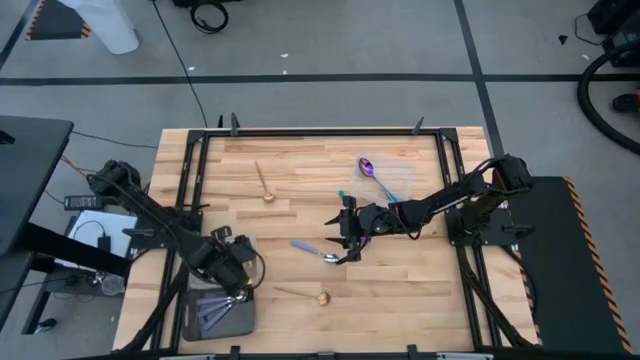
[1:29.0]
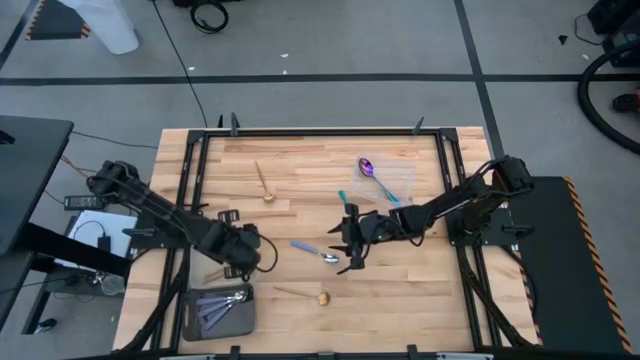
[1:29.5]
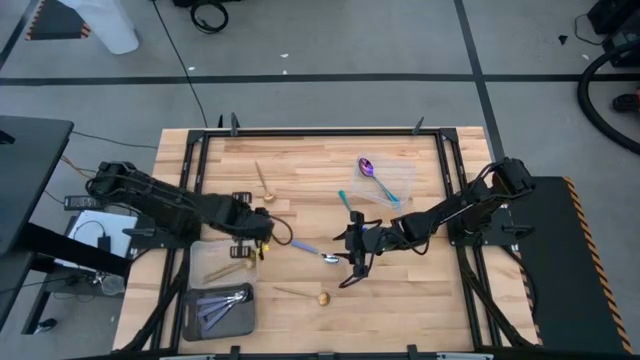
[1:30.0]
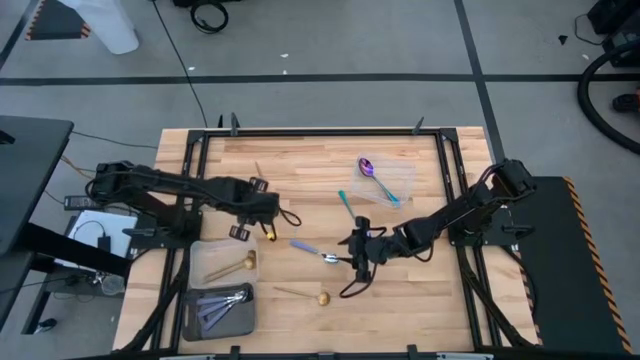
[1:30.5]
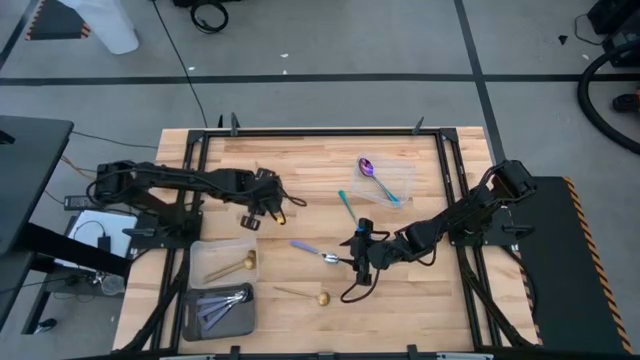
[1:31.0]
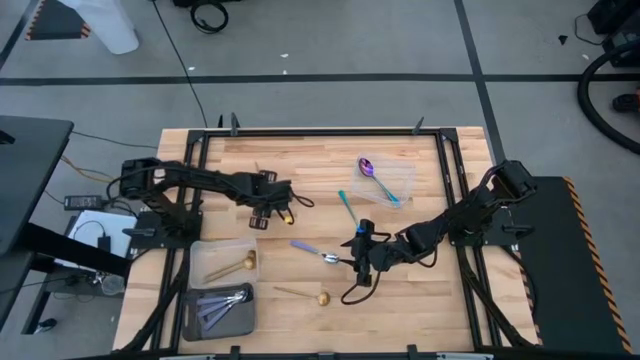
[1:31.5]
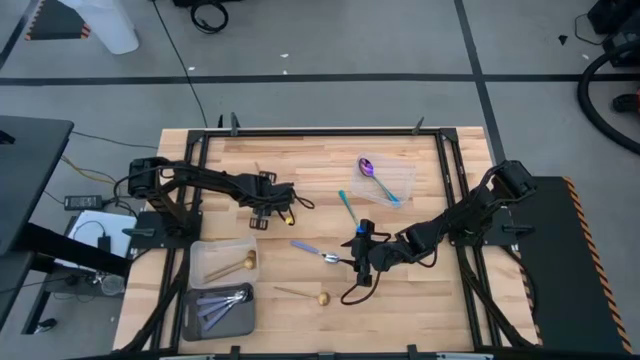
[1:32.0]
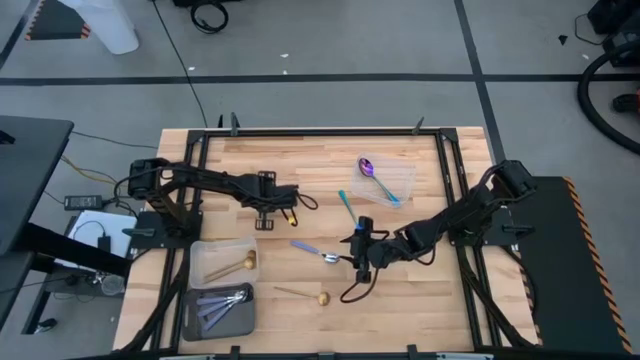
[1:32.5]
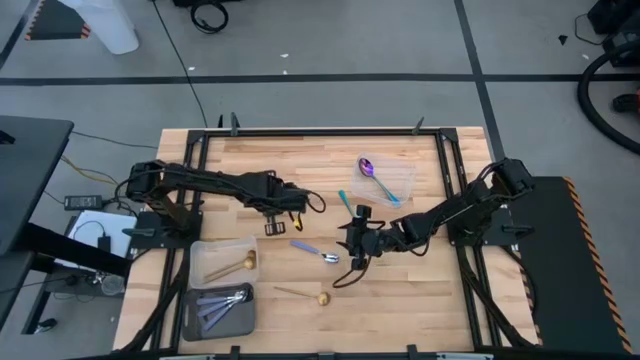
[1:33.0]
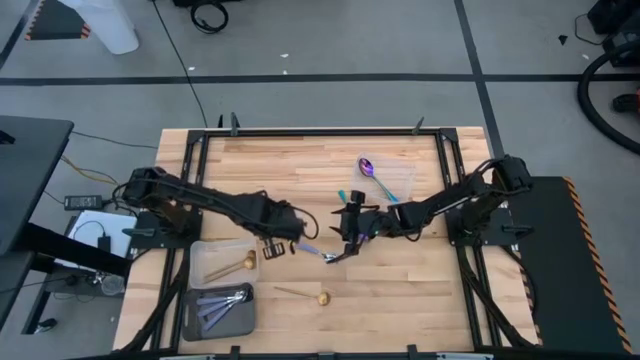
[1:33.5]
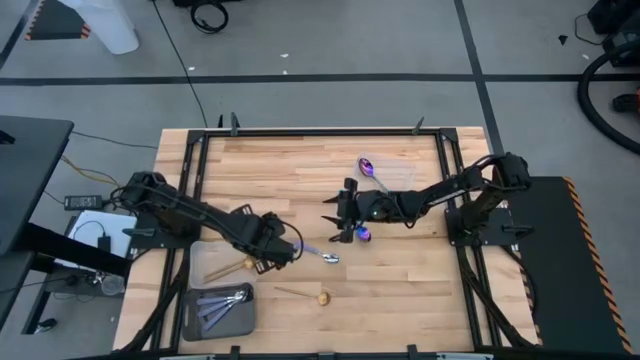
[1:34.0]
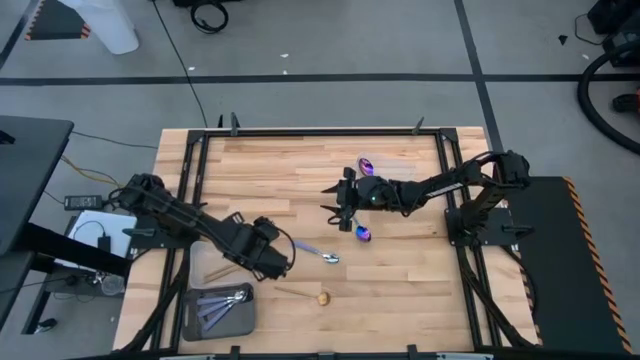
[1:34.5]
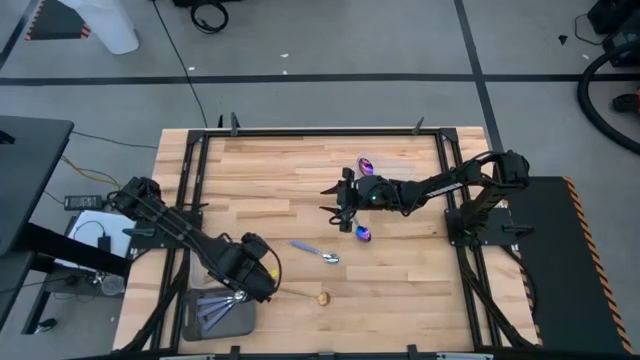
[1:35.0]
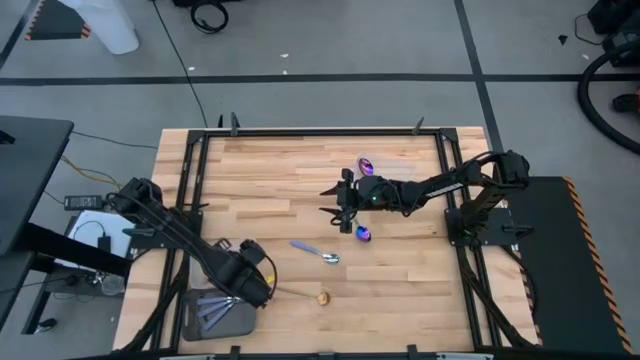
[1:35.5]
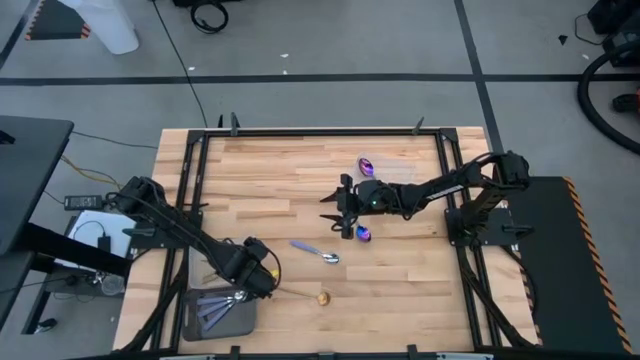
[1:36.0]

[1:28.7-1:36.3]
Task: Sort silverware by color (type)
Put the gold spoon into the bottom transparent bin

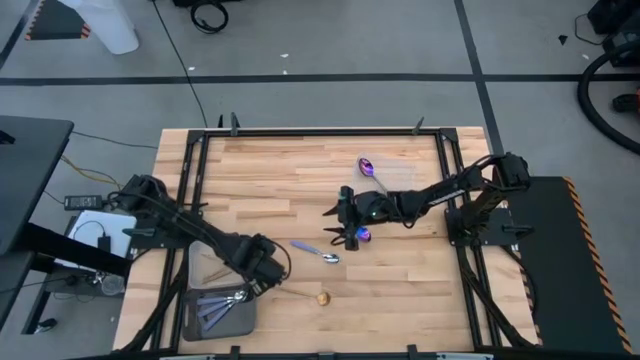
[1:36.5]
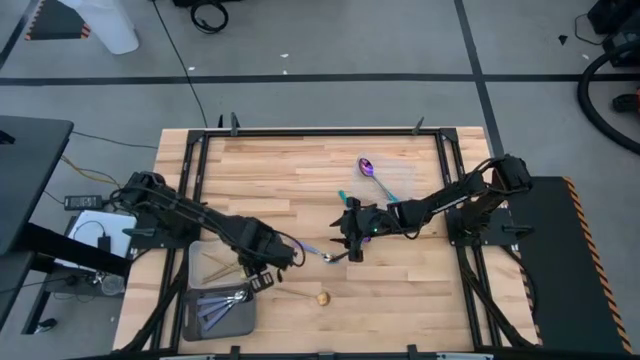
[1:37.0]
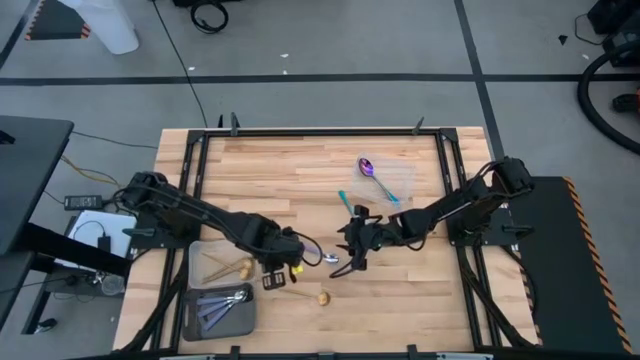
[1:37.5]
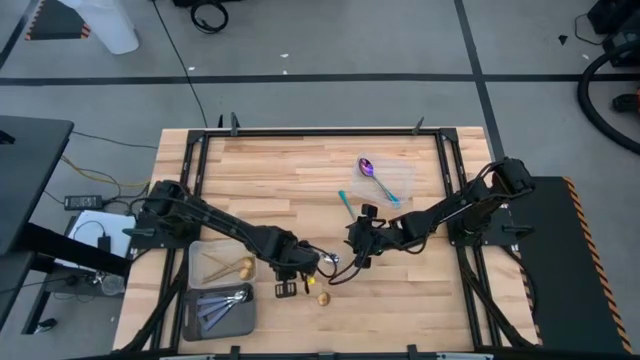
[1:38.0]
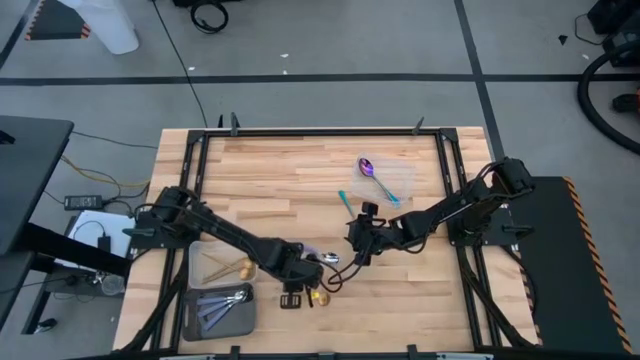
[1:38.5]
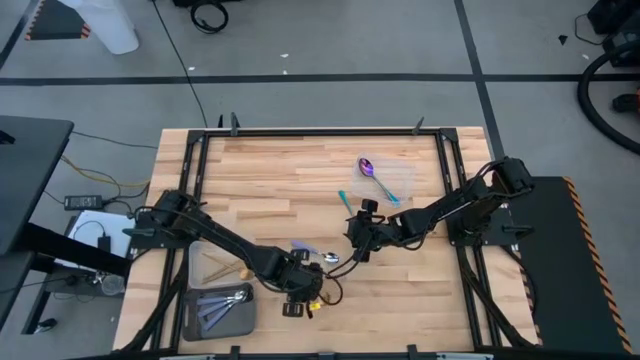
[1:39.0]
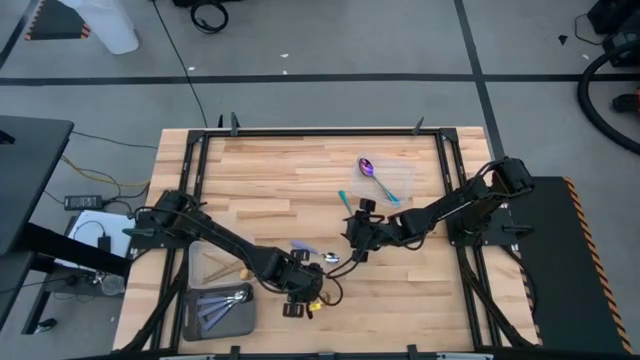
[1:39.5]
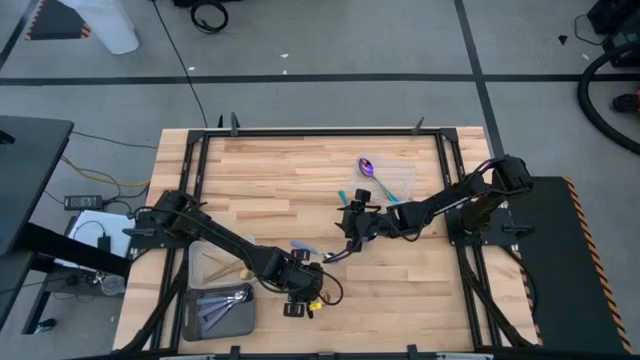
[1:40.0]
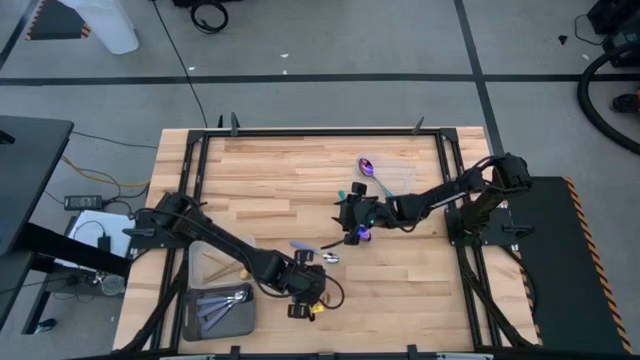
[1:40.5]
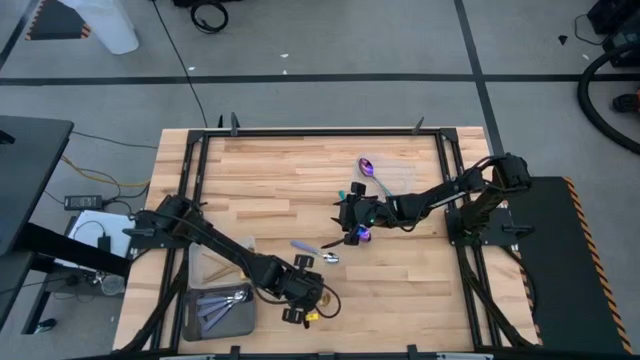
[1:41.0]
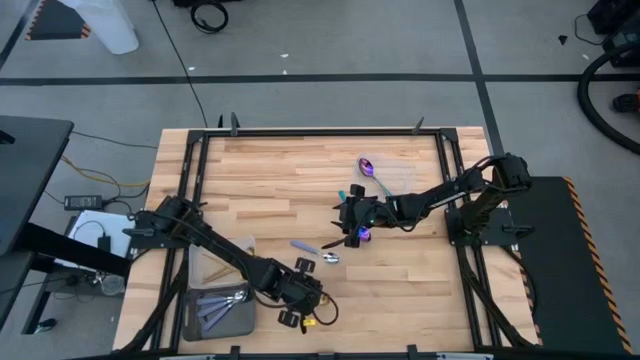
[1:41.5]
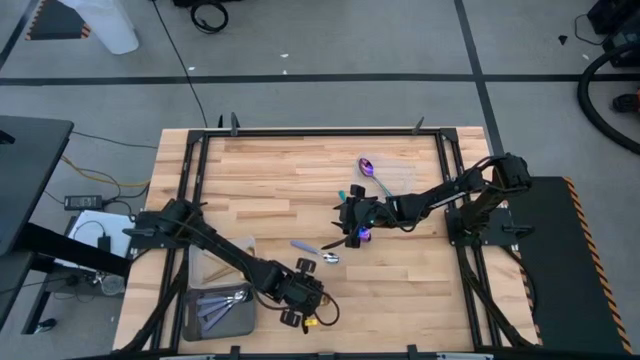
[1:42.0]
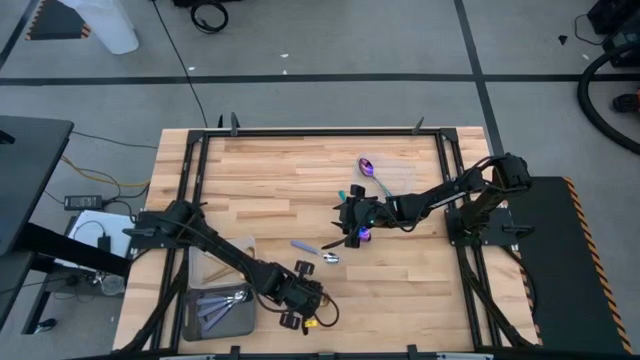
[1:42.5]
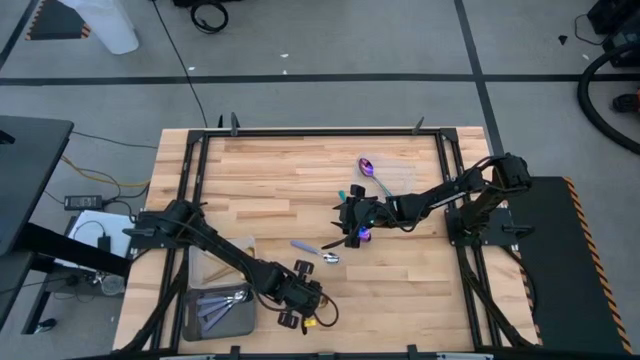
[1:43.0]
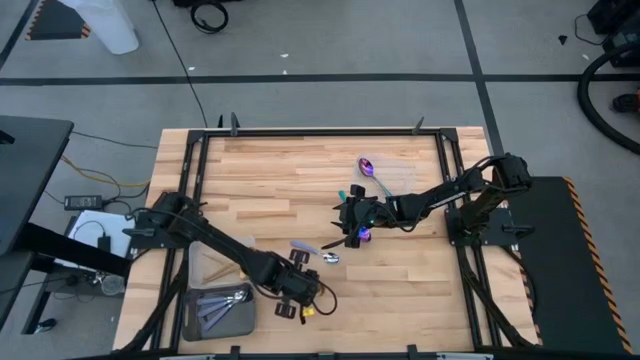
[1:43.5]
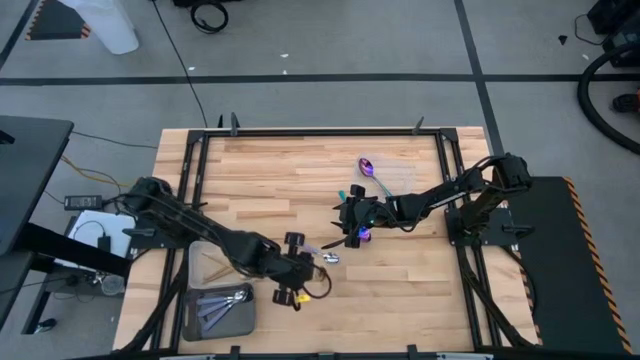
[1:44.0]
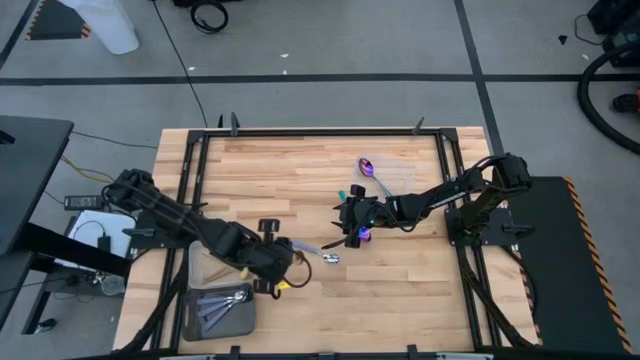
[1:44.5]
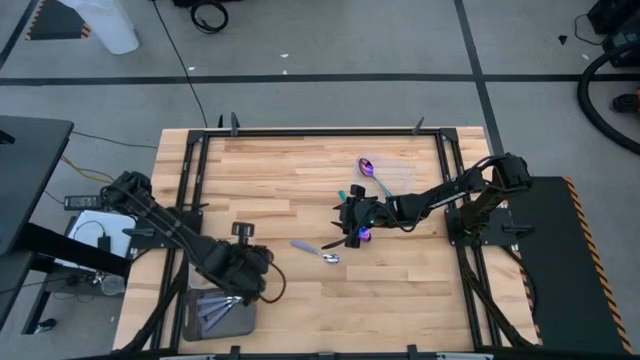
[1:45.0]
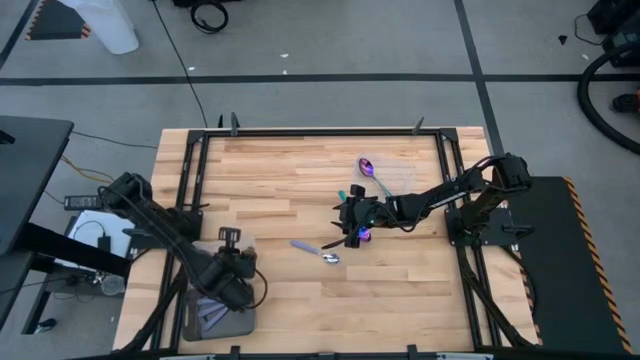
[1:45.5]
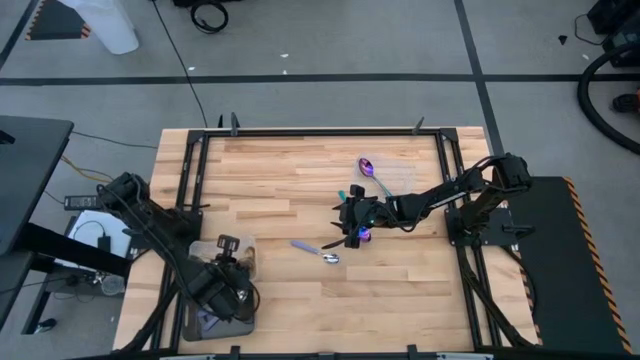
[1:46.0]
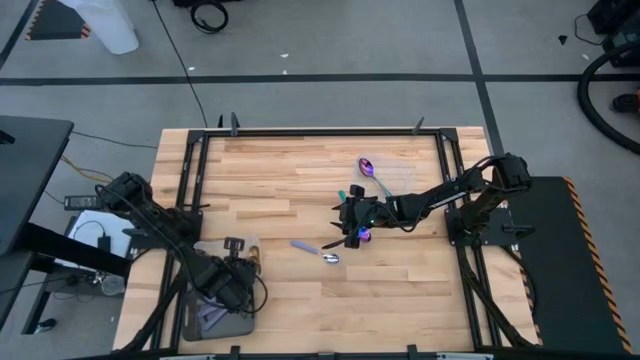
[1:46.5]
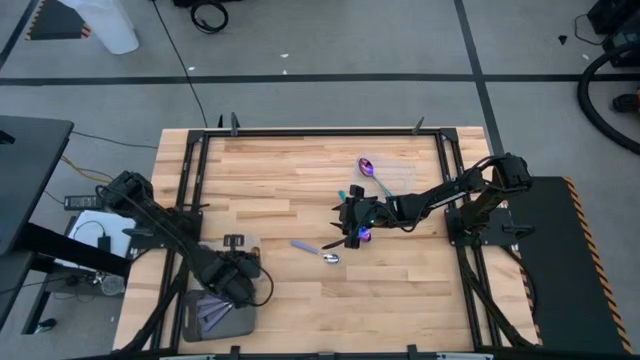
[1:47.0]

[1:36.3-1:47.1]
Put the gold spoon into the bottom transparent bin

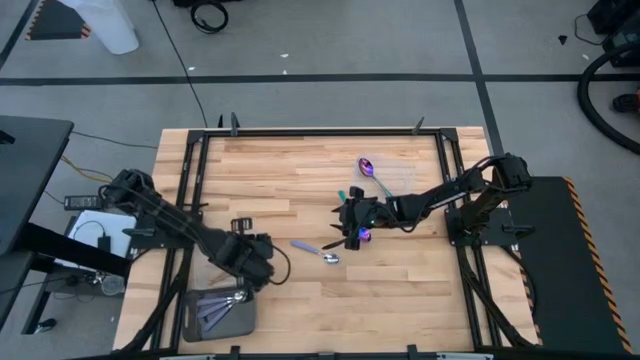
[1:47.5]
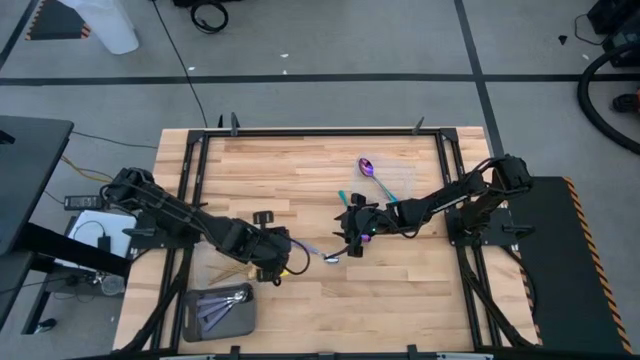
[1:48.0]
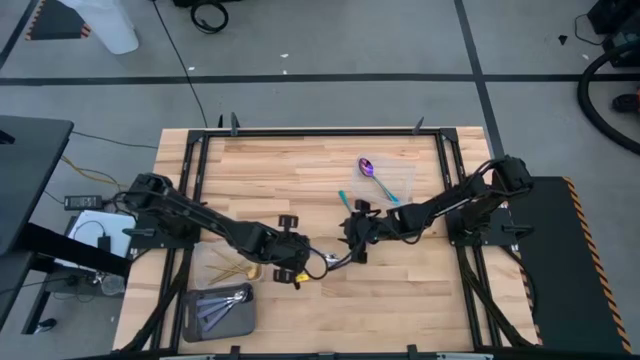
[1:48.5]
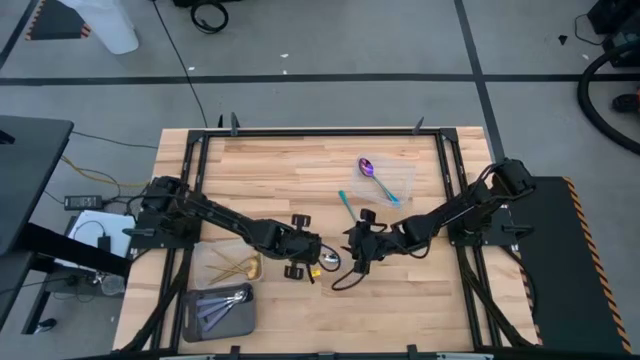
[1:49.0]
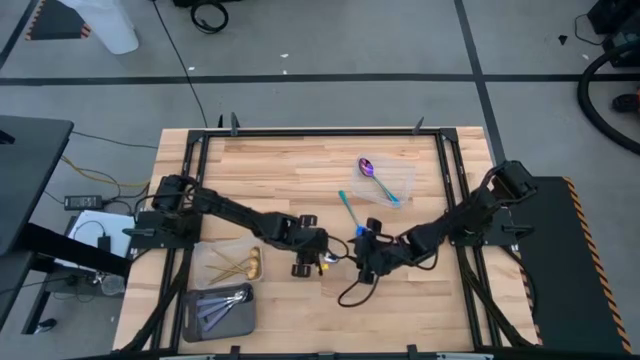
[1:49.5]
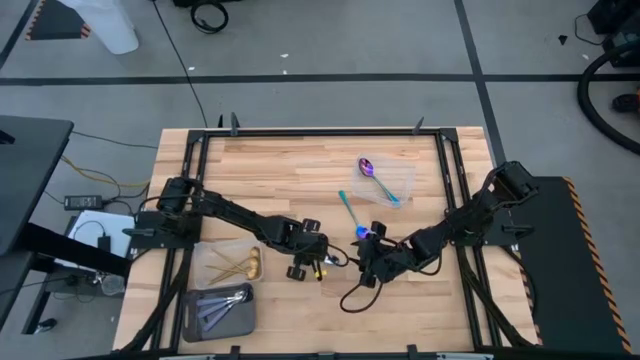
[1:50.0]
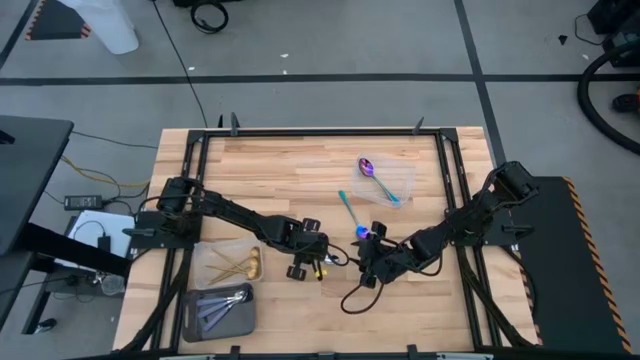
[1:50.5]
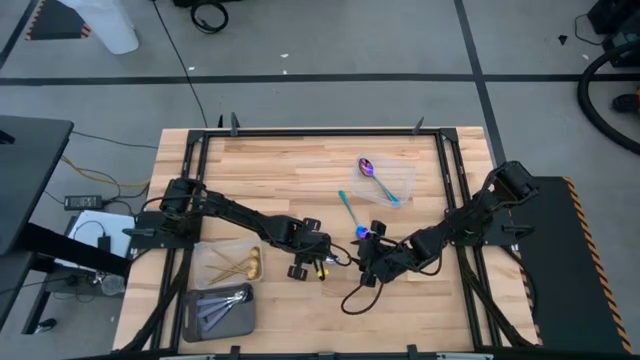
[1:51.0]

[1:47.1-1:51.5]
Put the purple spoon into the black bin

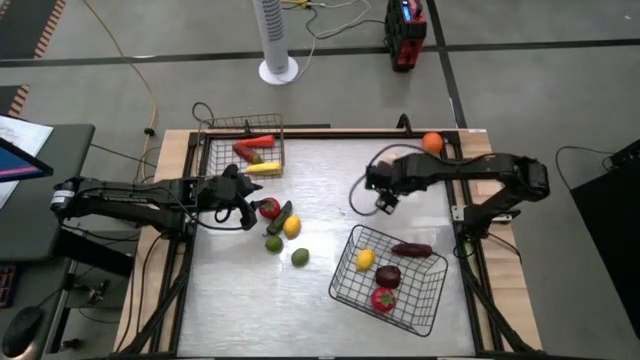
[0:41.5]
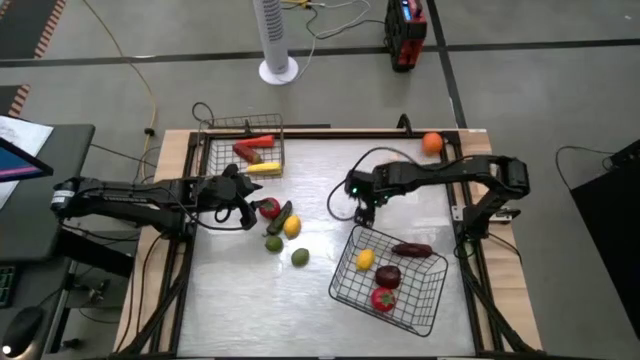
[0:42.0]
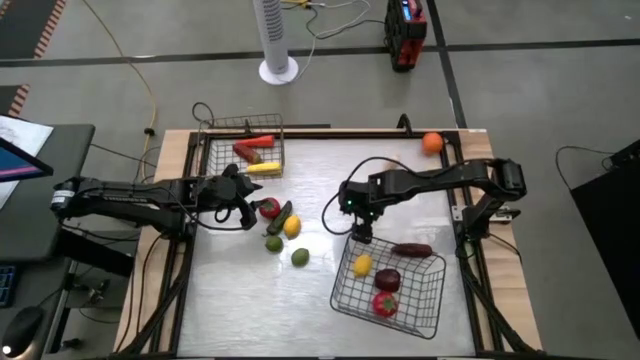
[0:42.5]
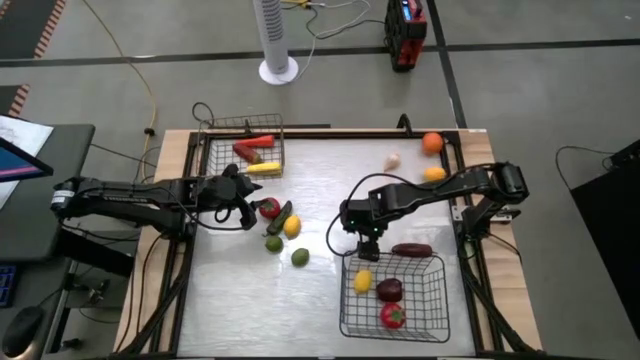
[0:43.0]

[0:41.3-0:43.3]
Task: Sort produce into baskets
Adjust the bottom wire basket
